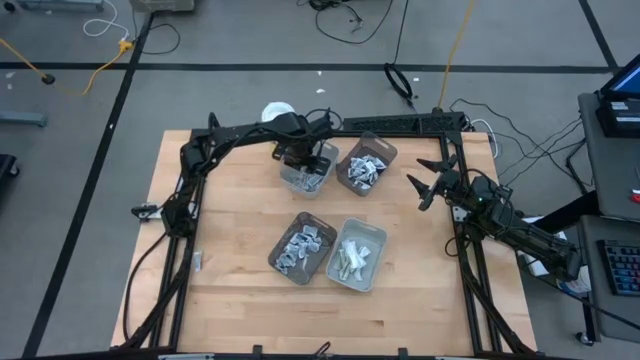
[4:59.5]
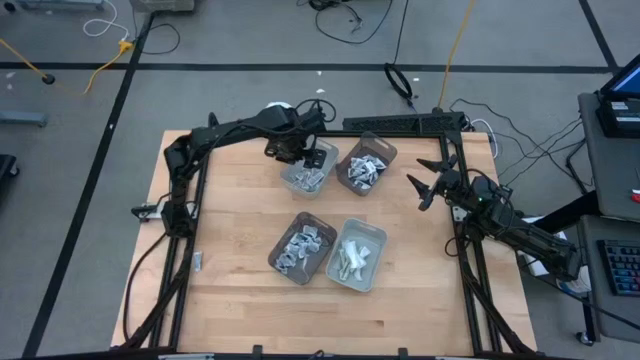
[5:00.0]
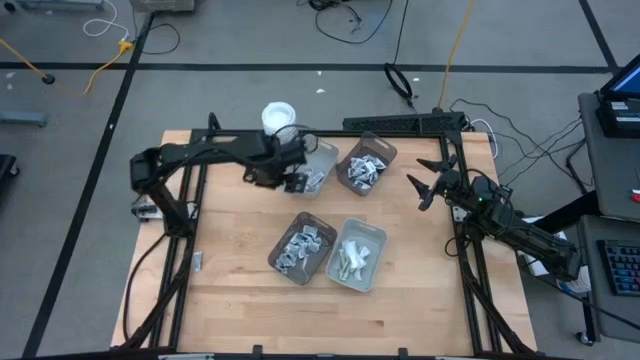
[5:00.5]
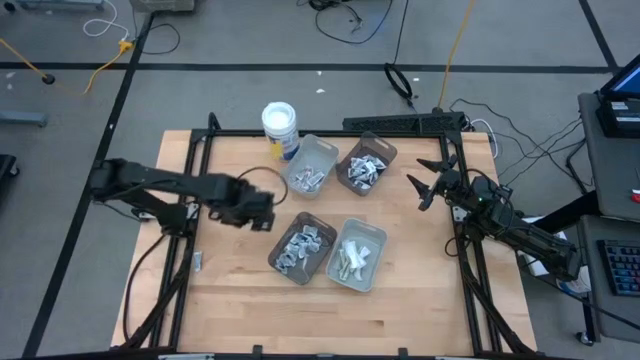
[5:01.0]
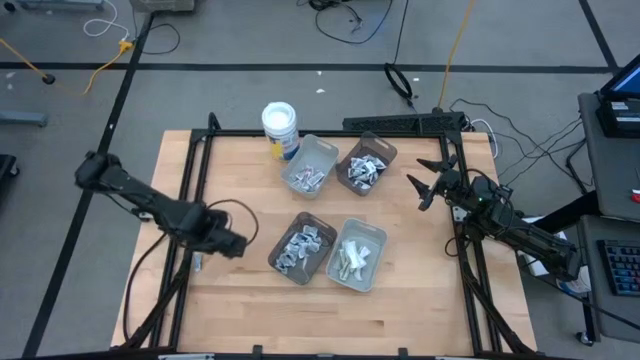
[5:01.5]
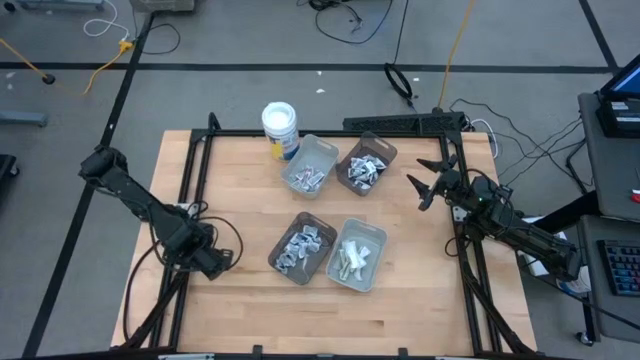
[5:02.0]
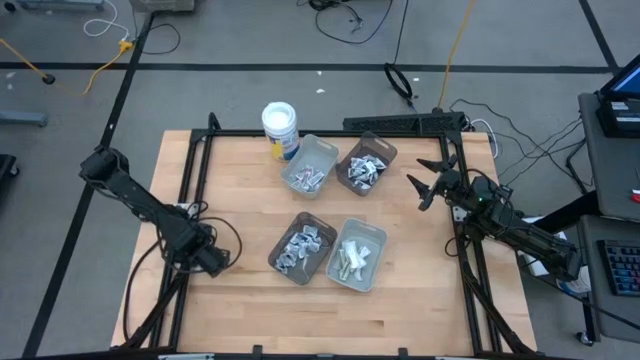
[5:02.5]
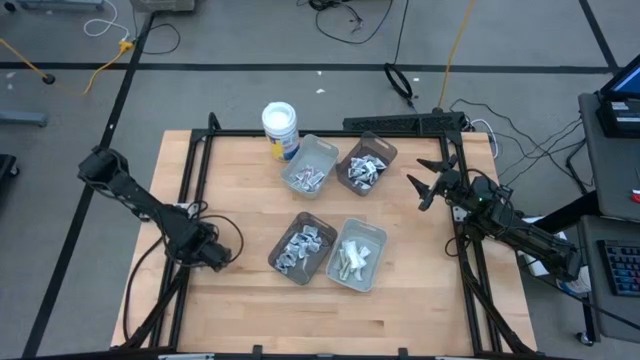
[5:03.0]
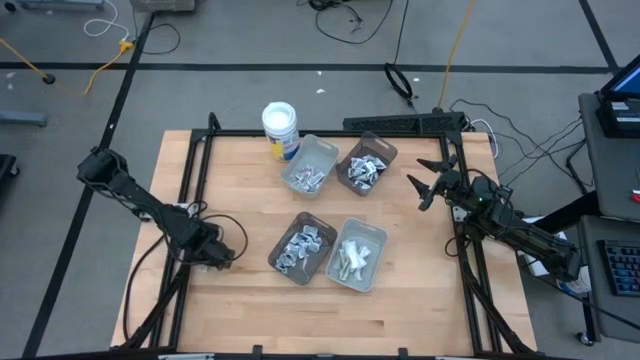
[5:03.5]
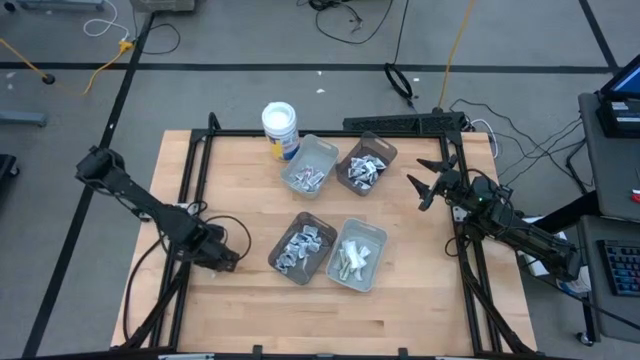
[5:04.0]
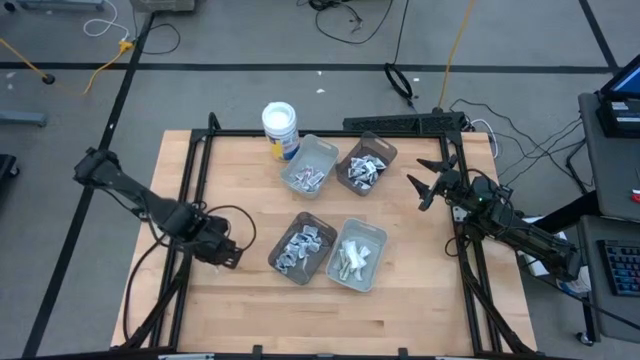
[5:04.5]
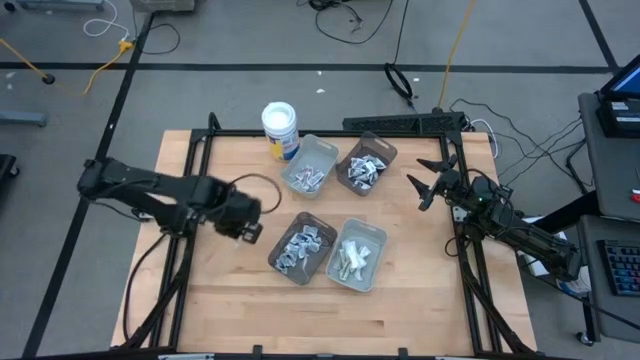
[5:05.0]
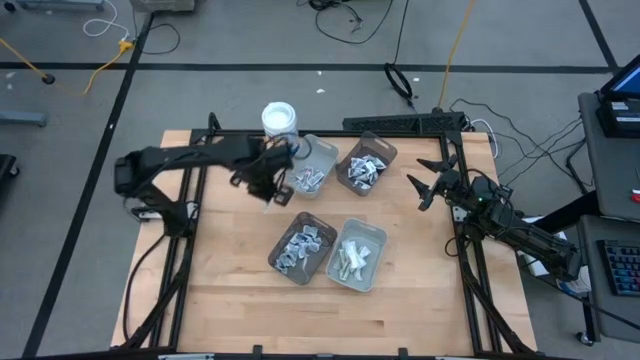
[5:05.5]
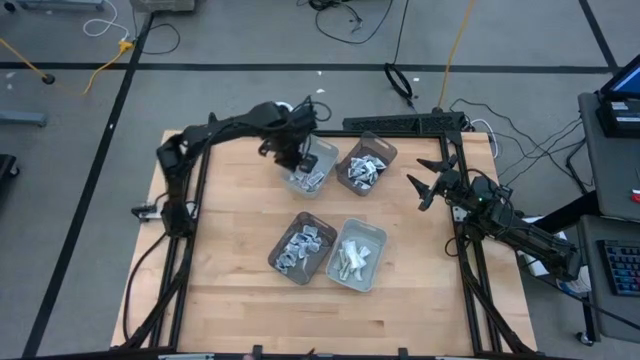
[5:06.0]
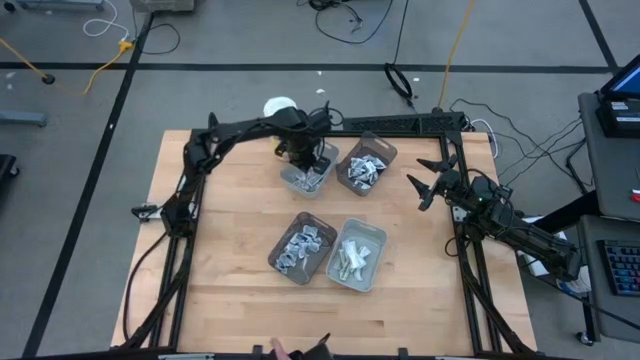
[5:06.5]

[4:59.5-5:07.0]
Task: Pick & Place First Aid Supplies
Put the orange ointment pack into the top gray bin

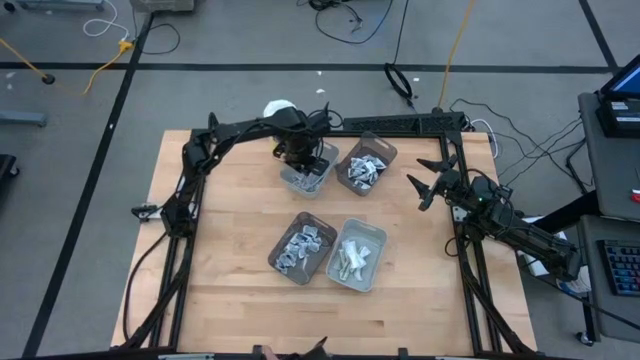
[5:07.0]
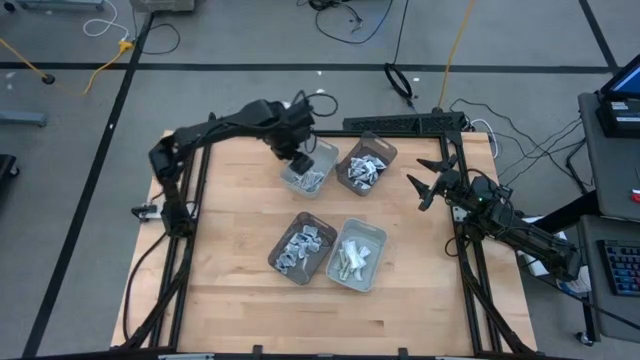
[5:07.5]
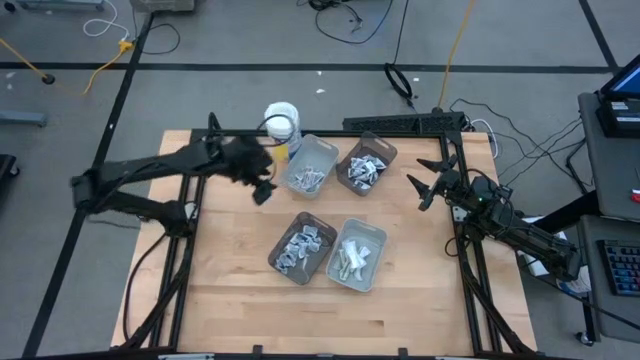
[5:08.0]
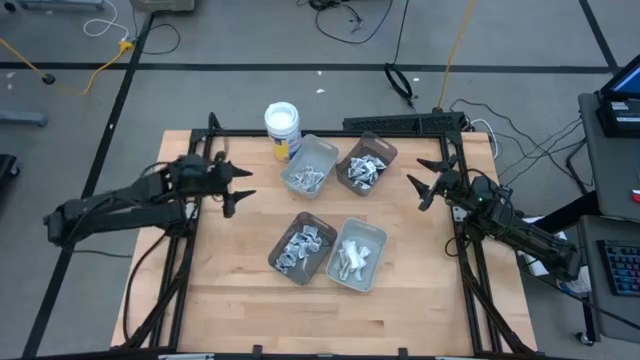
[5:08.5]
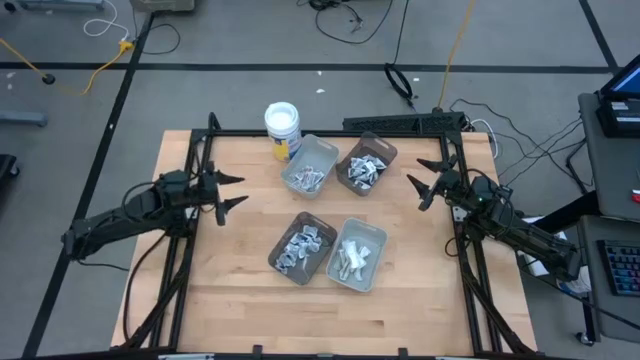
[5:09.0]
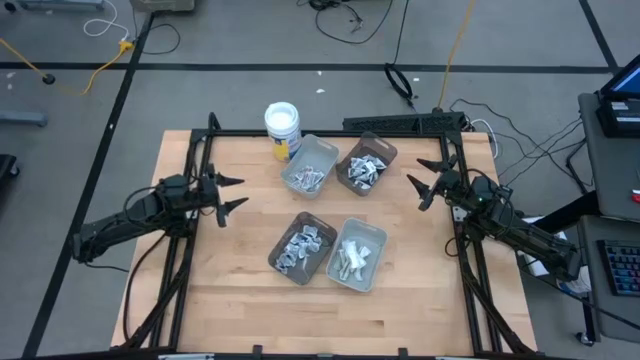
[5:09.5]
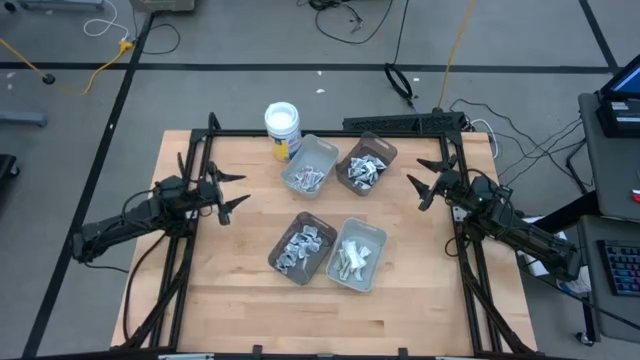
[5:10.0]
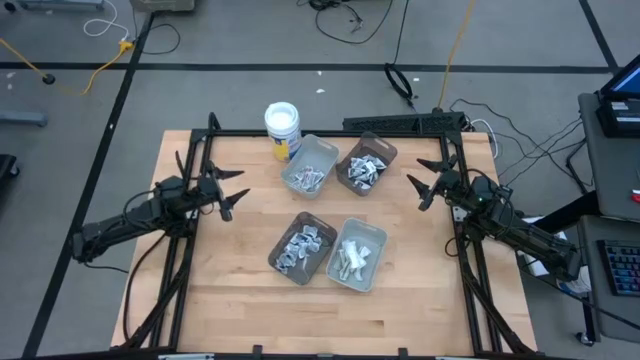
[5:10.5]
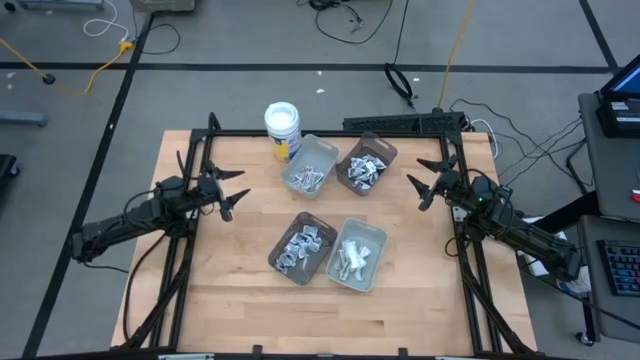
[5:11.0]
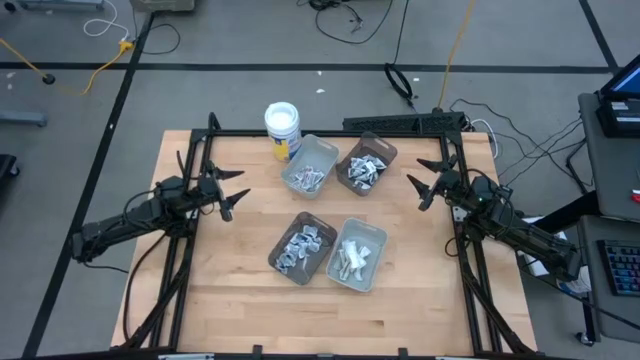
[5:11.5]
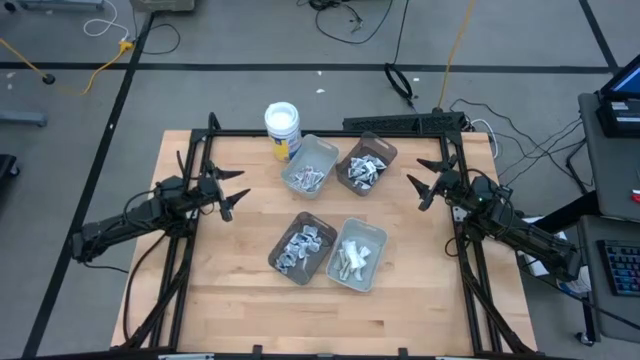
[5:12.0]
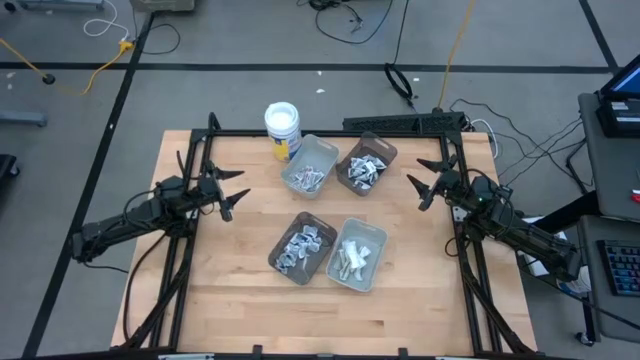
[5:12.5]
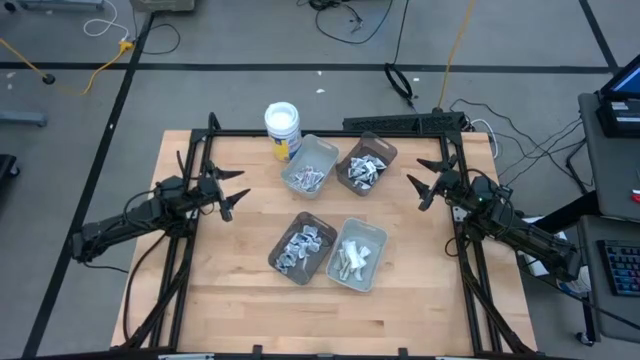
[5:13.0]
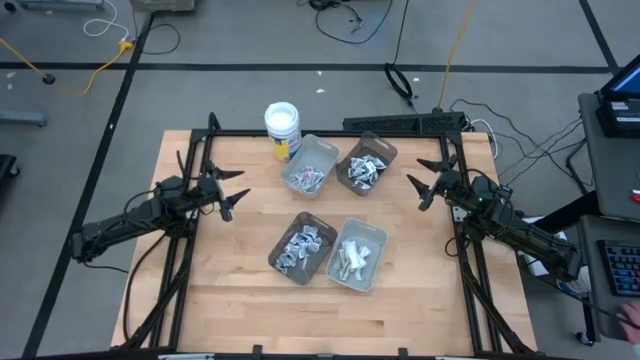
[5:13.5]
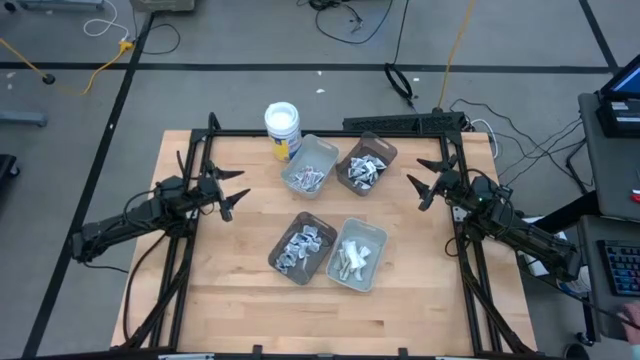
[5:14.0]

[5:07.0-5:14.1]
Return to Home Position

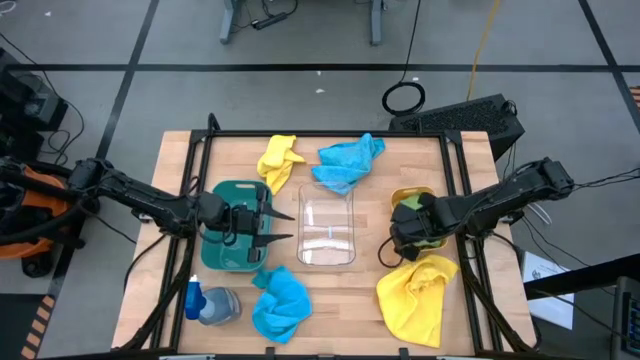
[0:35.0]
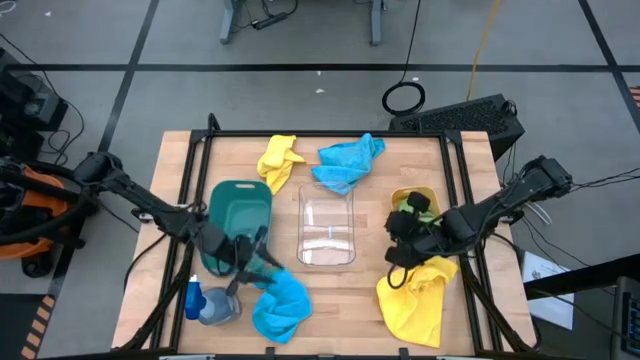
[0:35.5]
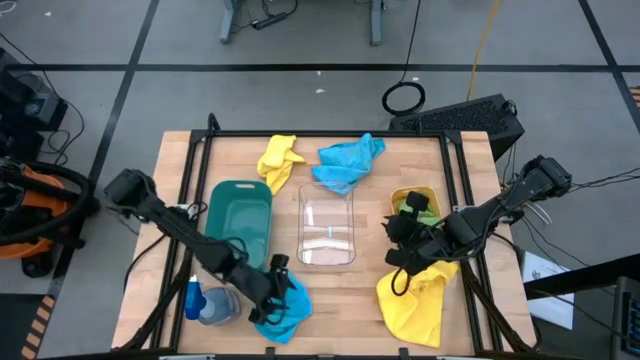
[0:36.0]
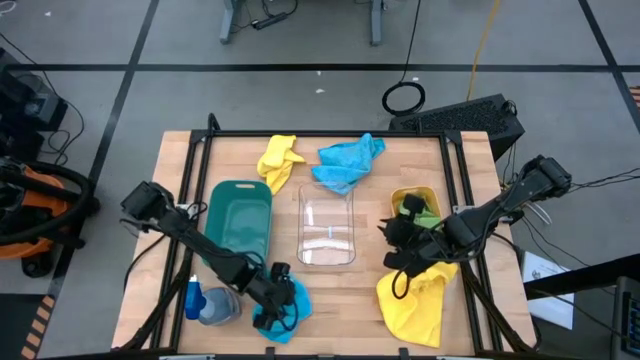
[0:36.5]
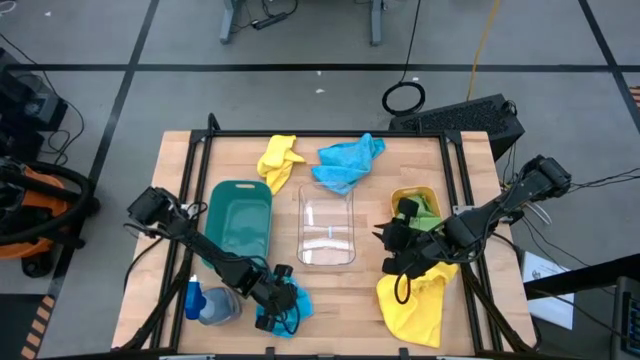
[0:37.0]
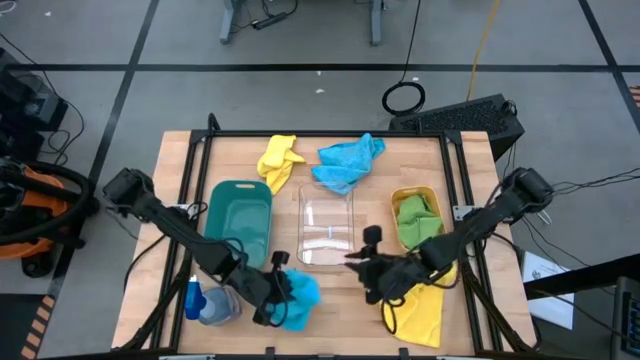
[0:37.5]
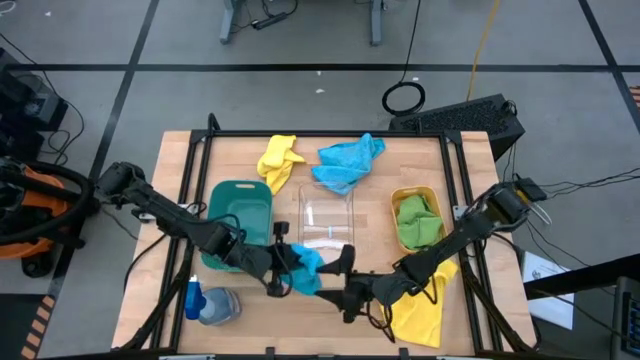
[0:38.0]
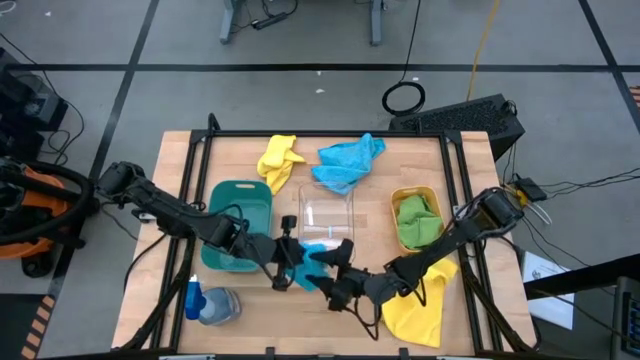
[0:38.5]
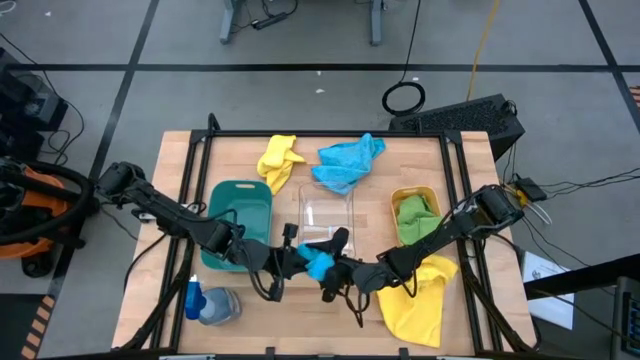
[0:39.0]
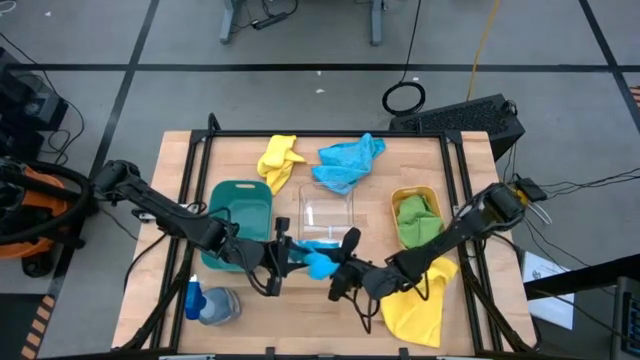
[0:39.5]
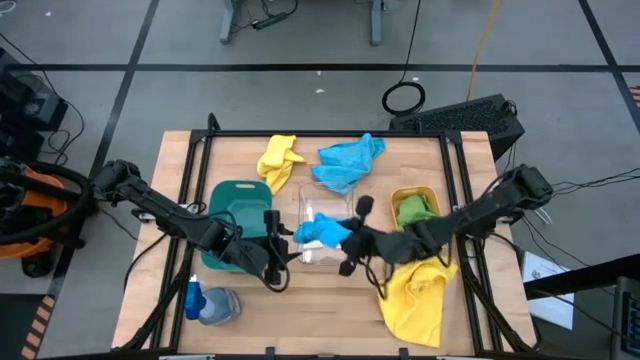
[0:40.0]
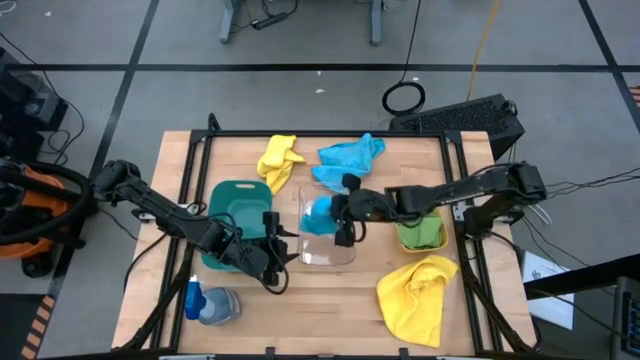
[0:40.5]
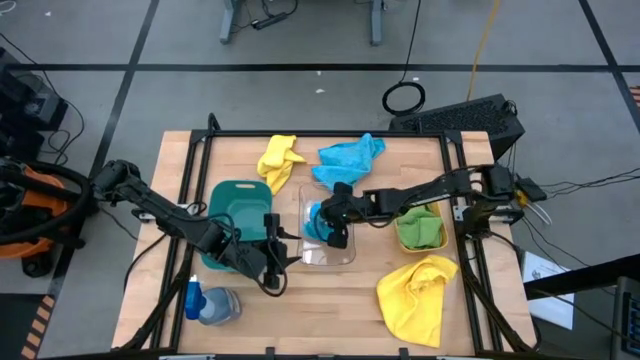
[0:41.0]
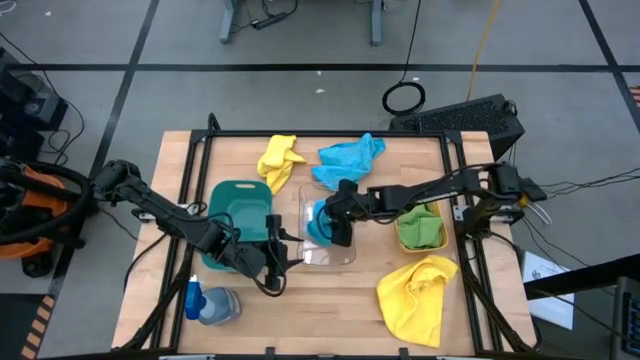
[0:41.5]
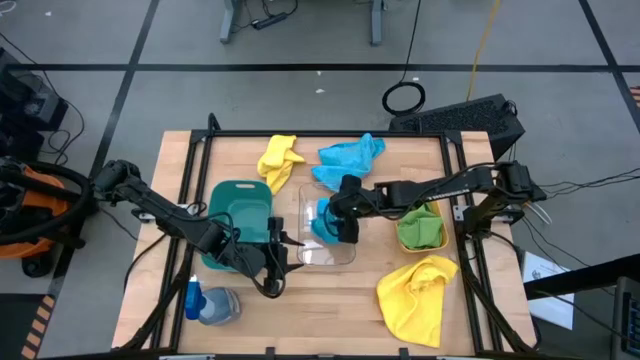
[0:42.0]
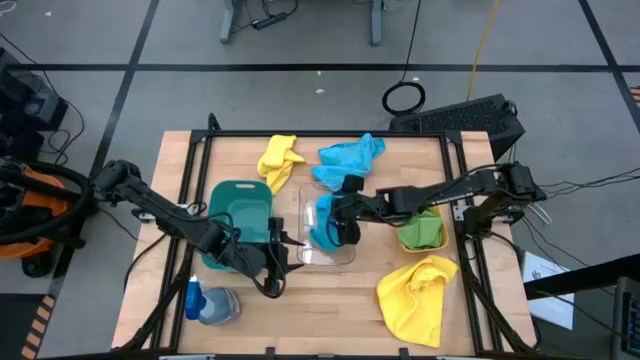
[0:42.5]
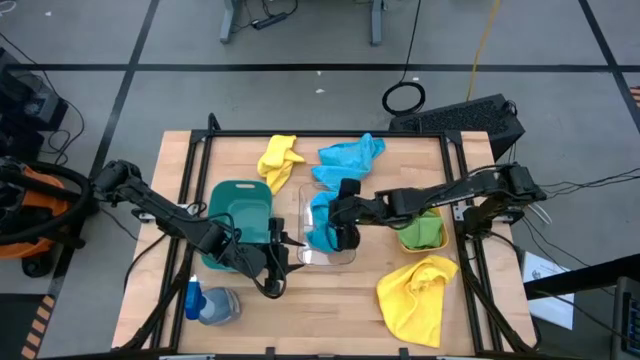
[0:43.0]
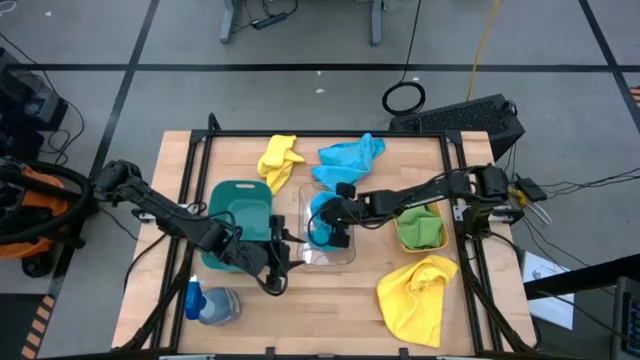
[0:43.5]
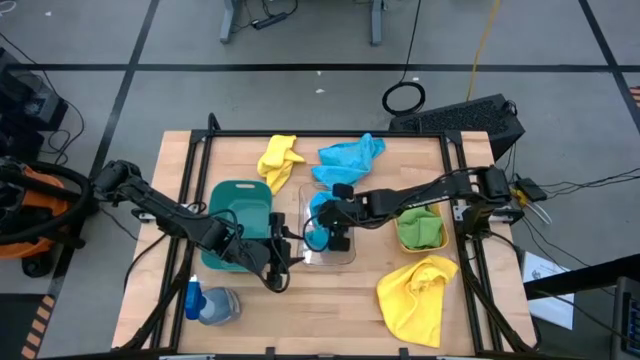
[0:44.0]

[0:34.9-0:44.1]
Task: Sort microfiber towel by color & place in baskets
Put the bottom blue microfiber towel into the transparent bin
